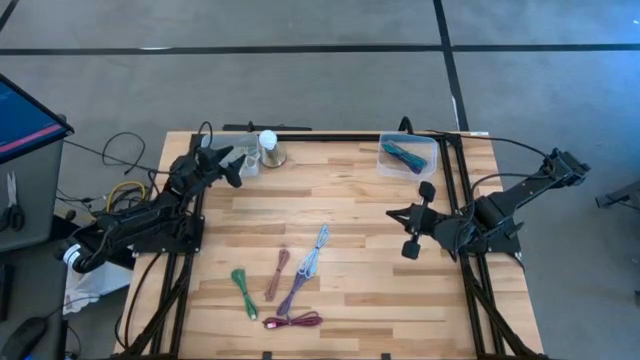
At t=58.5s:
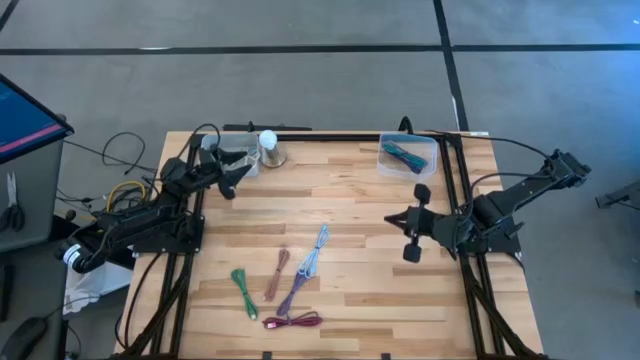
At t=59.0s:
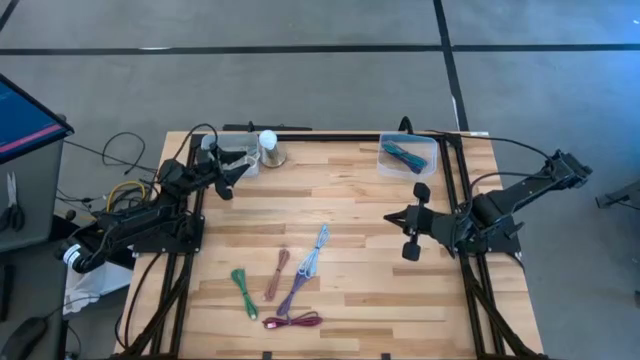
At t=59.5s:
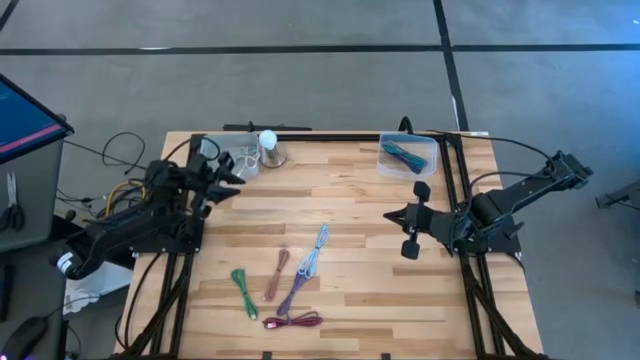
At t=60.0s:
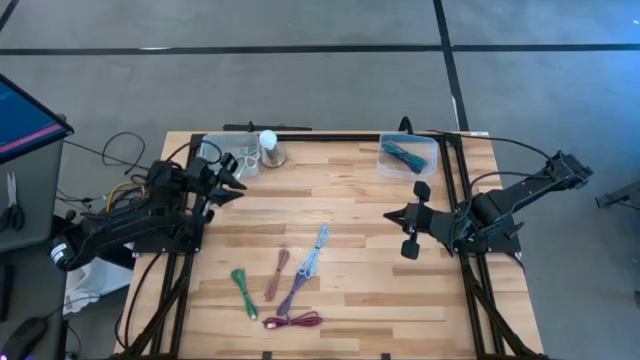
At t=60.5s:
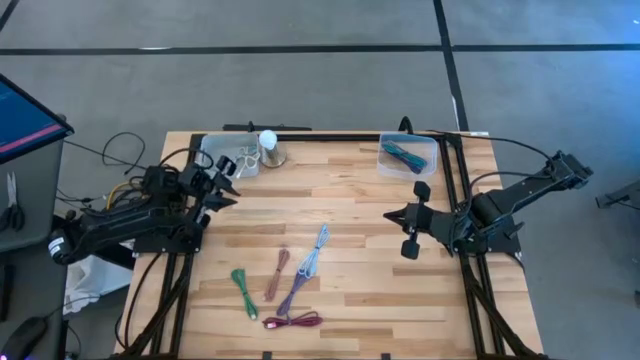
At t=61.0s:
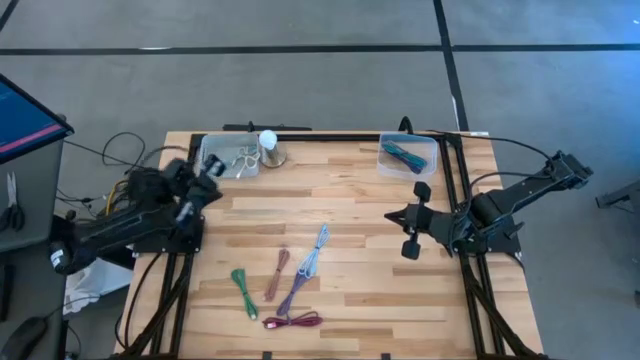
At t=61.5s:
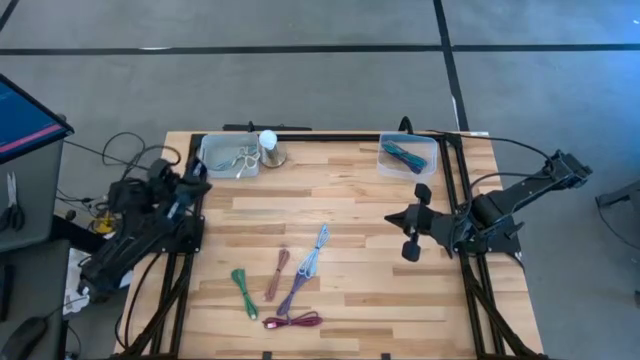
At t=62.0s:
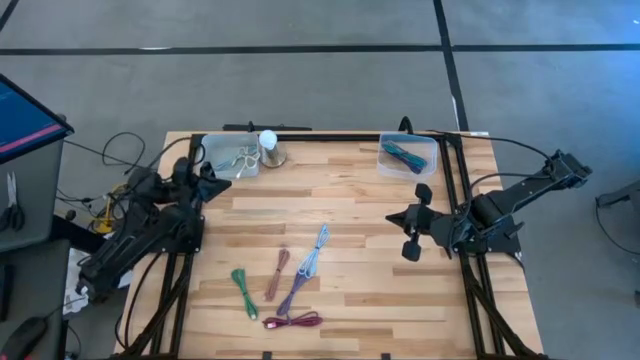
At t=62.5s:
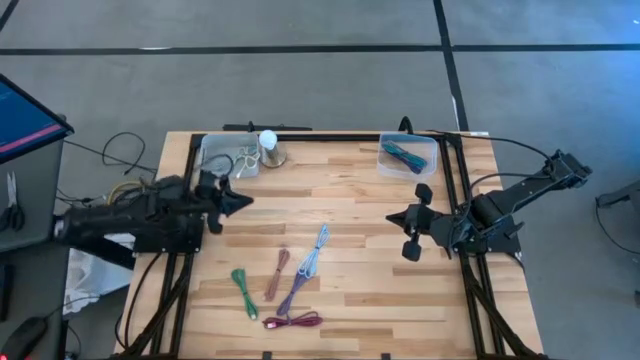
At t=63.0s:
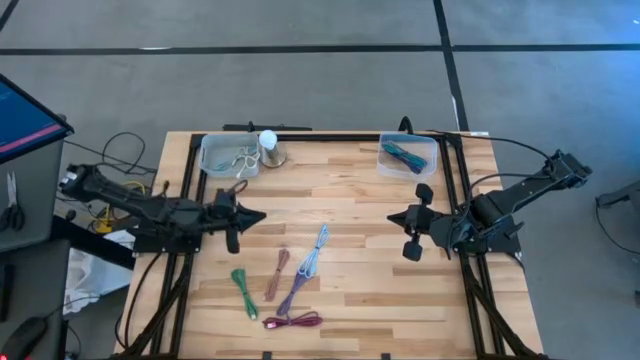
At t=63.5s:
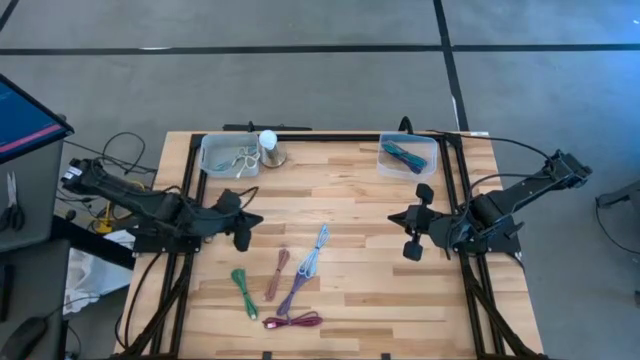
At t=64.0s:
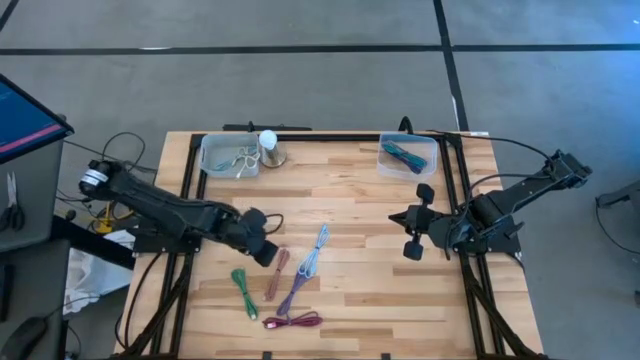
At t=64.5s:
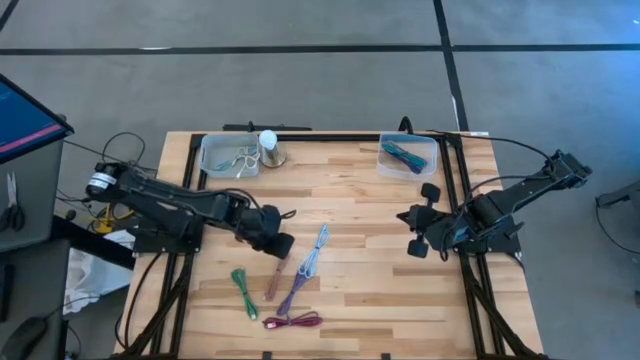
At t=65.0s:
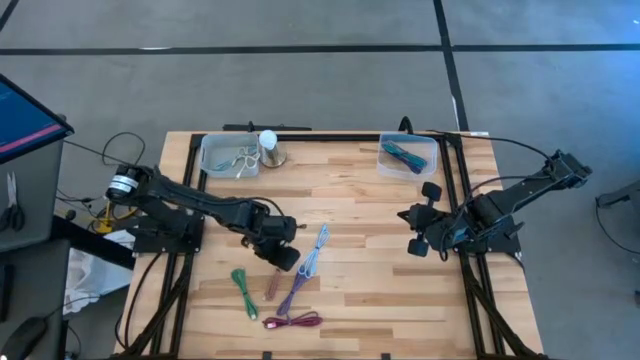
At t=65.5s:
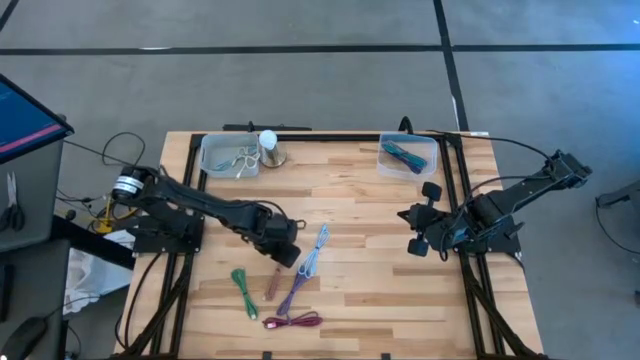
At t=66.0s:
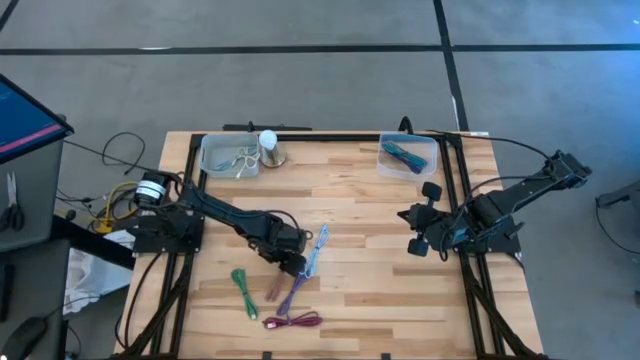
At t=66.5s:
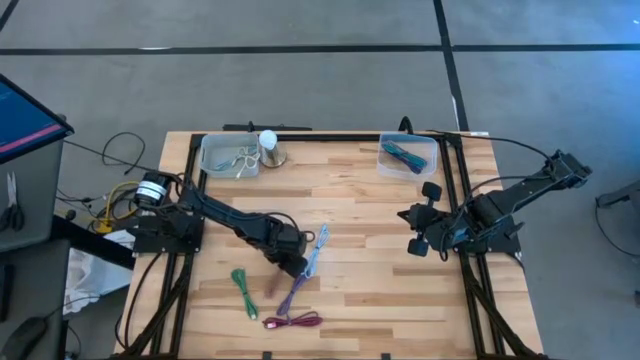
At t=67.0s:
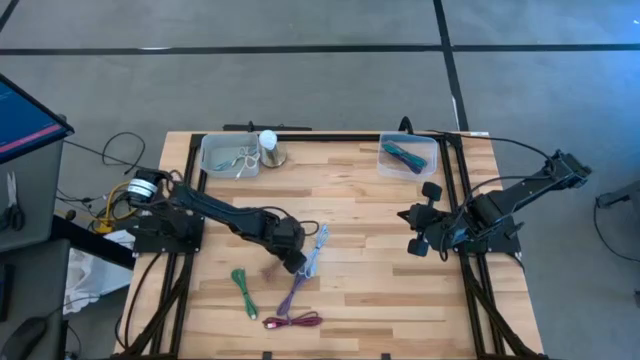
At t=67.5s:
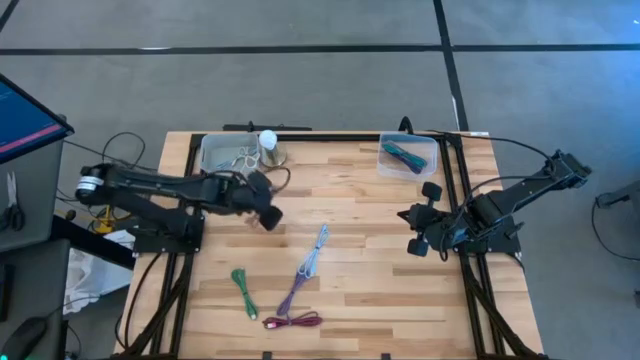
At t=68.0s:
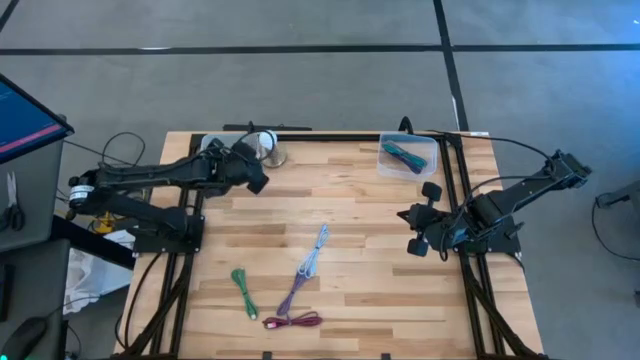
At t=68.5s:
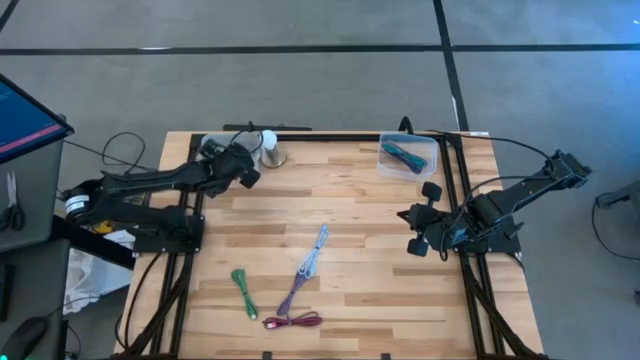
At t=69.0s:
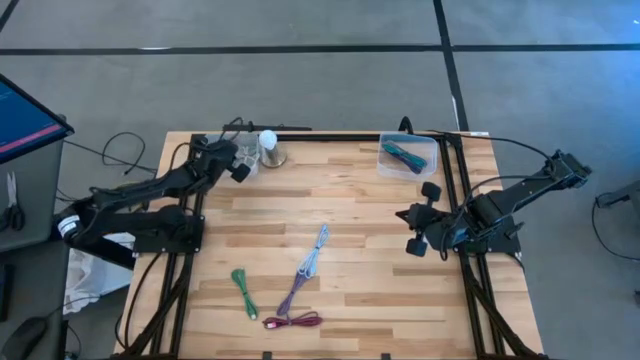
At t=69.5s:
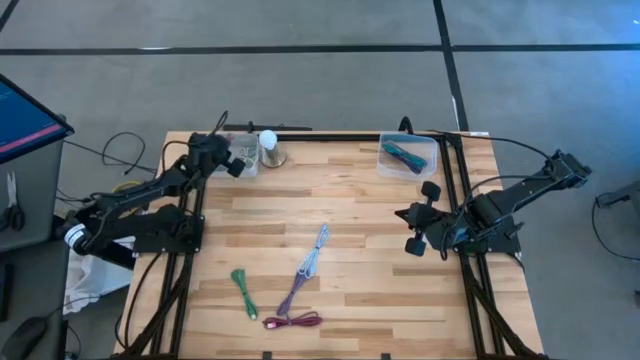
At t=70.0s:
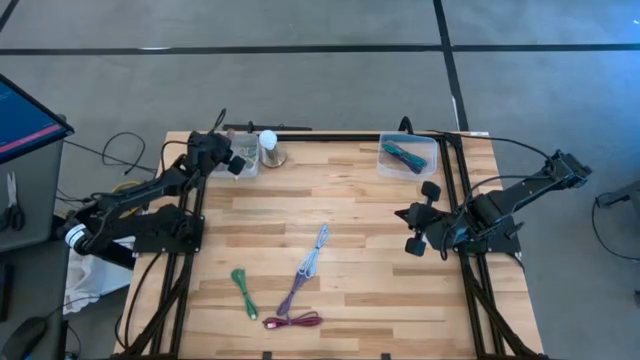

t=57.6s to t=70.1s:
Task: Pick & Place USB Port
Put the pink charger cable into the gray bin

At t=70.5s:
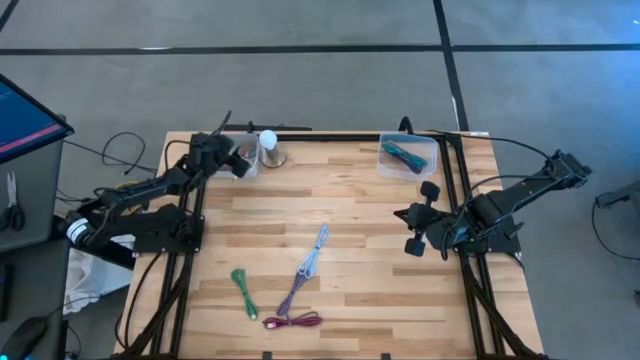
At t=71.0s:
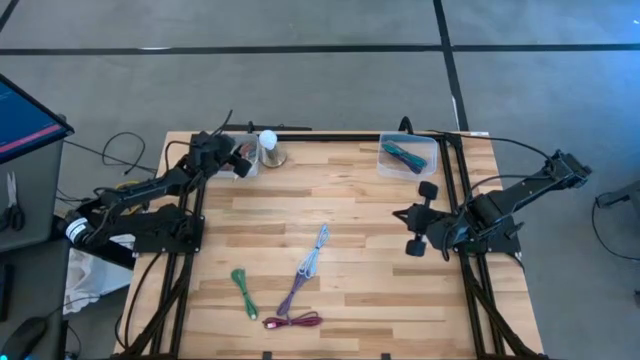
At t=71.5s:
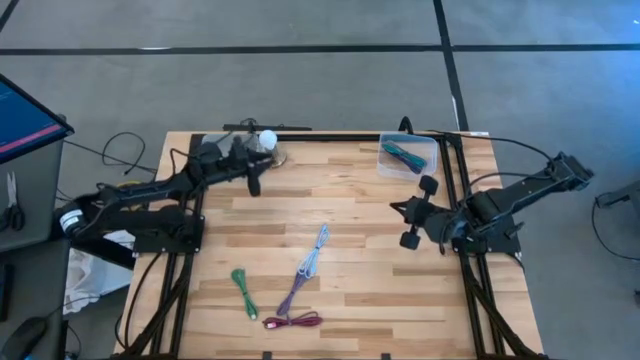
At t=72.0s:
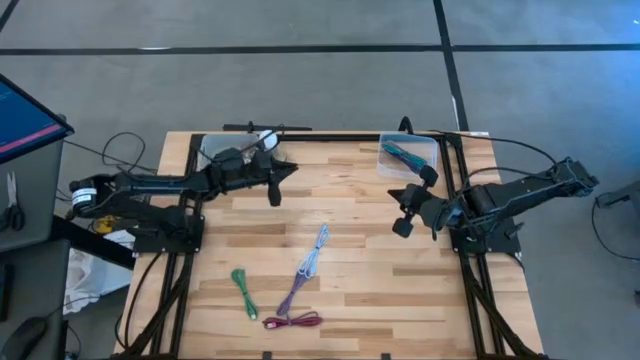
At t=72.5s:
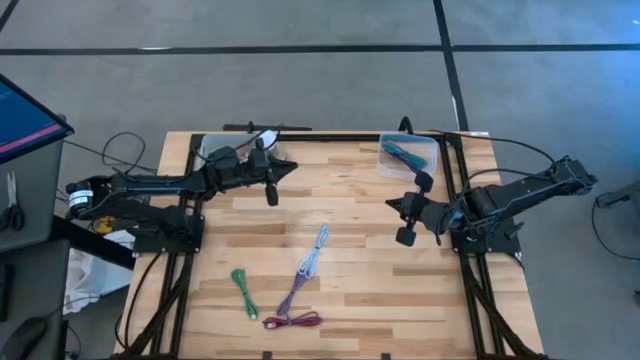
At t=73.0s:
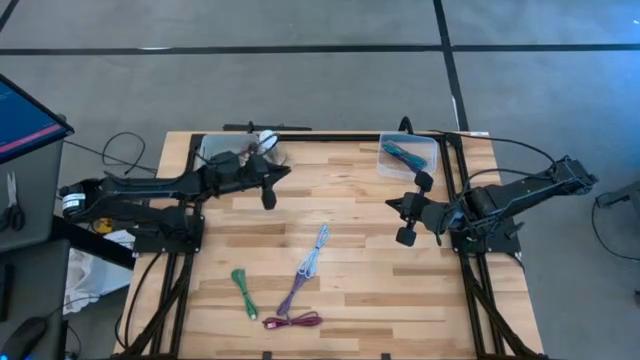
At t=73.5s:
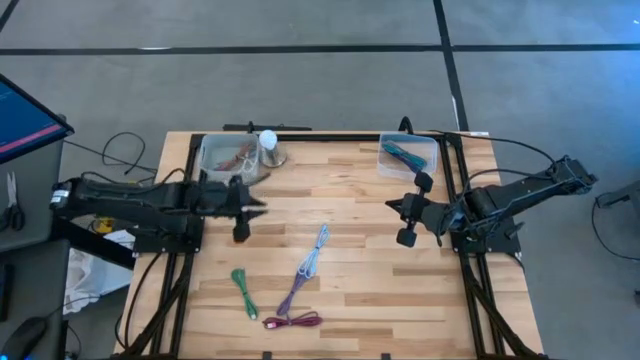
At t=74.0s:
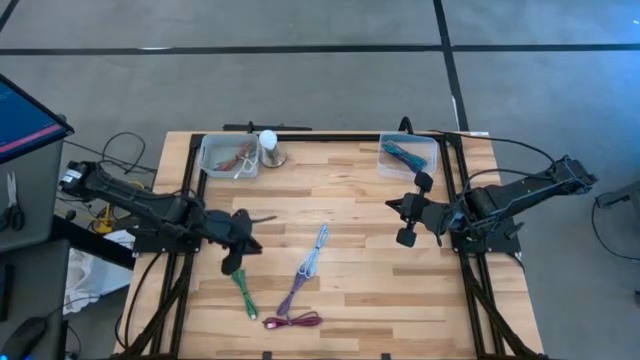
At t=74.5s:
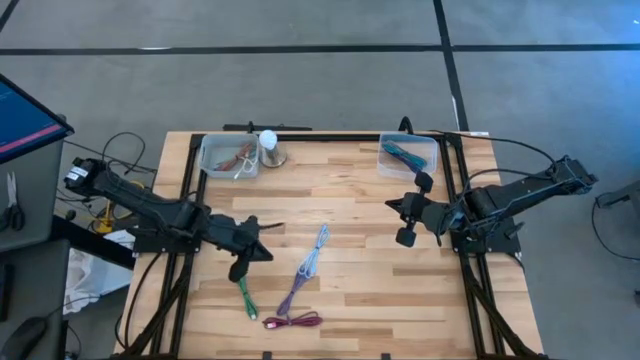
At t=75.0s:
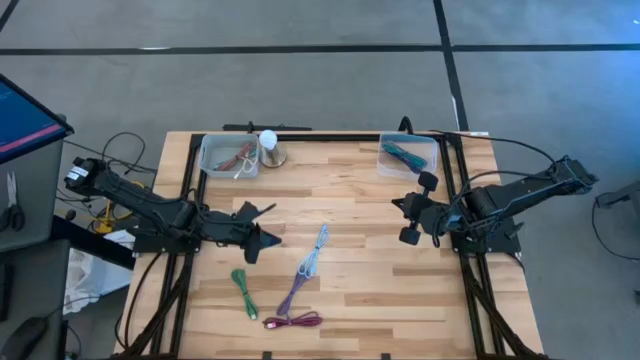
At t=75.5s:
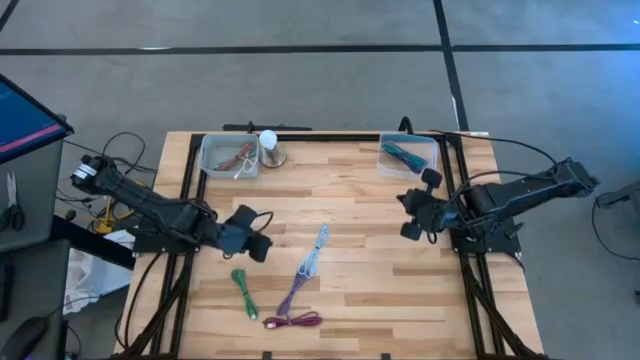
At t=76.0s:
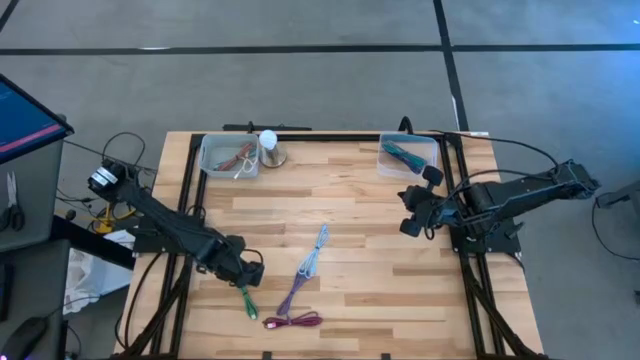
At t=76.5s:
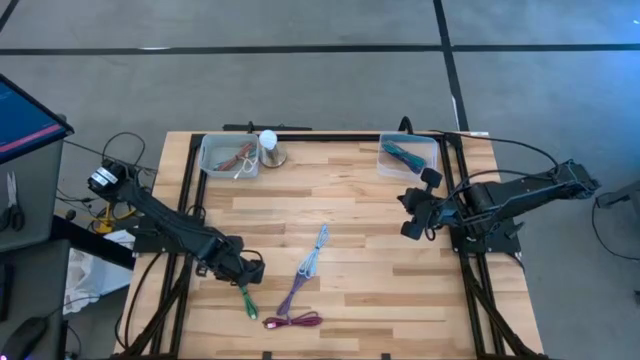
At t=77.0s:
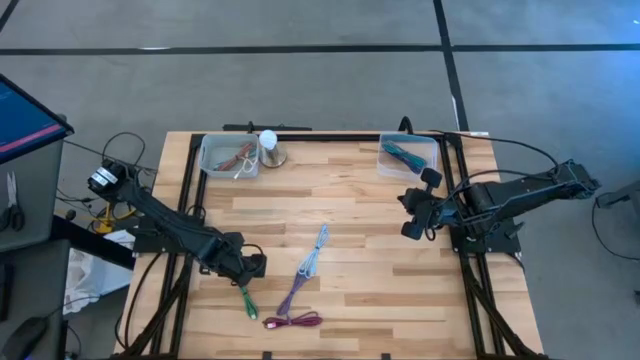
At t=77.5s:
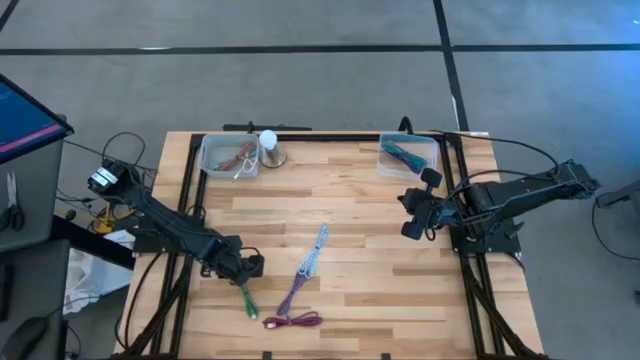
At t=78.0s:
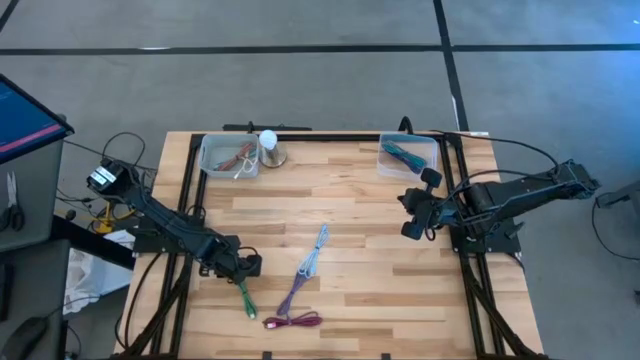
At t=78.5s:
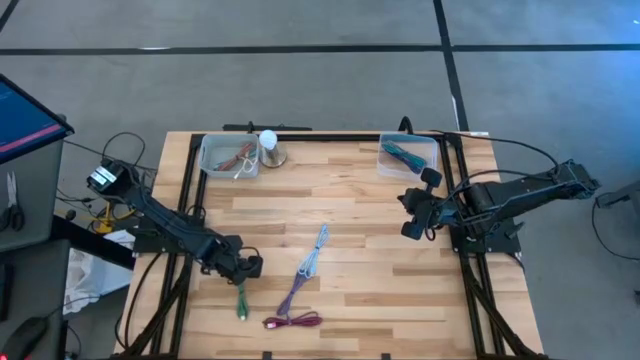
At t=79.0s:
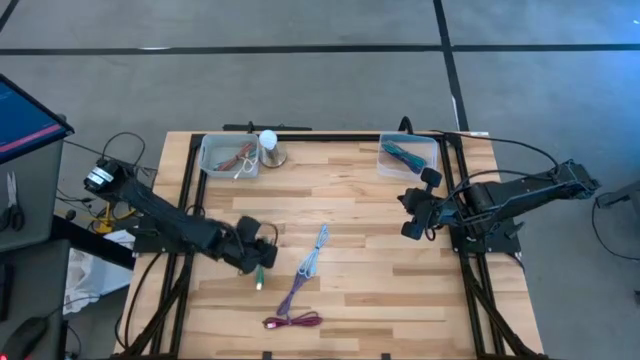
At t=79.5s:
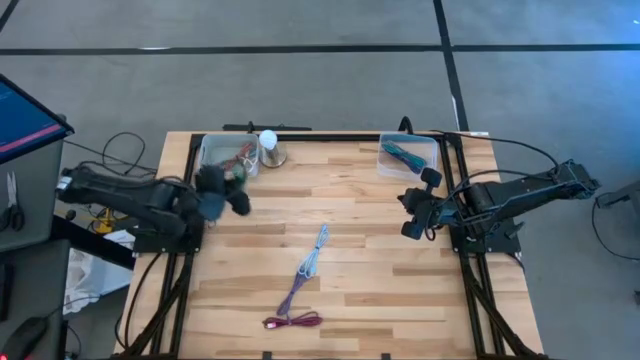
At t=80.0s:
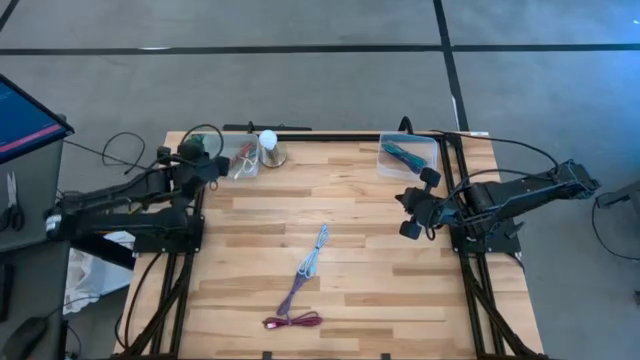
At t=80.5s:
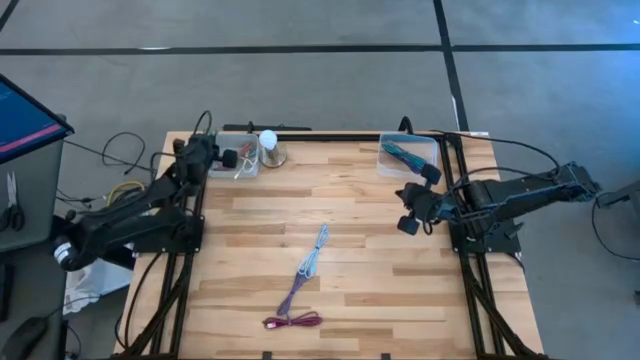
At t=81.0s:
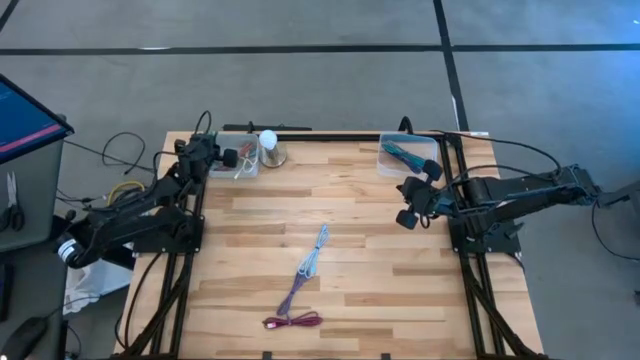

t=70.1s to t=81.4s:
Put the green charger cable into the gray bin
